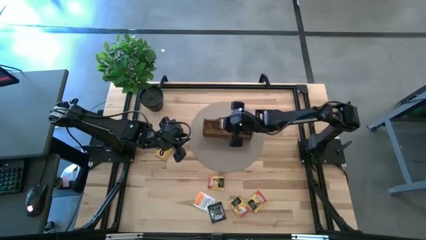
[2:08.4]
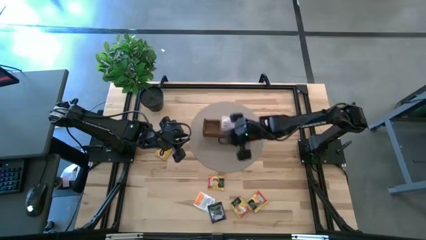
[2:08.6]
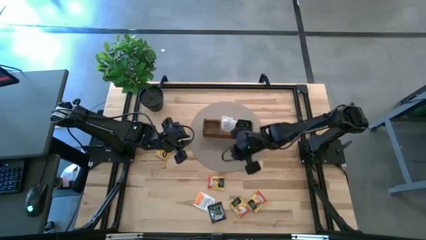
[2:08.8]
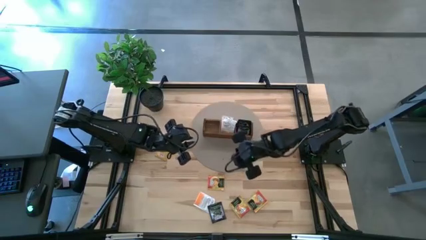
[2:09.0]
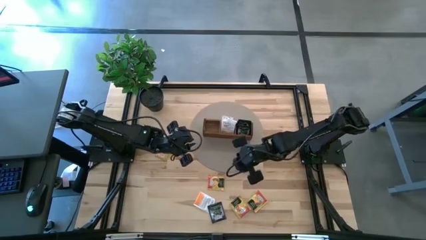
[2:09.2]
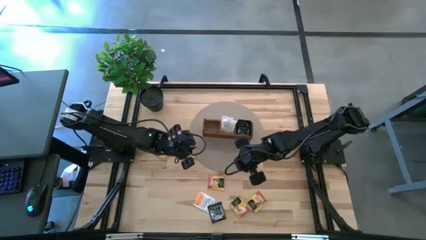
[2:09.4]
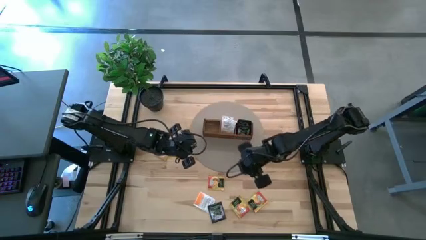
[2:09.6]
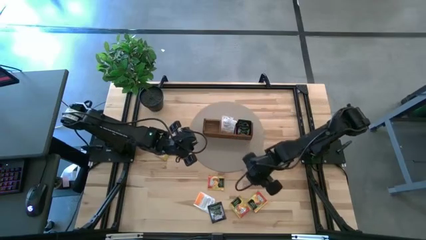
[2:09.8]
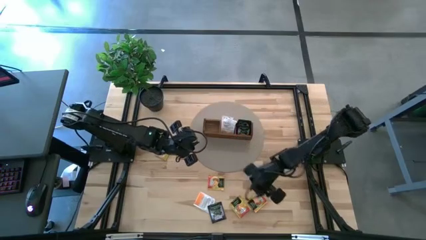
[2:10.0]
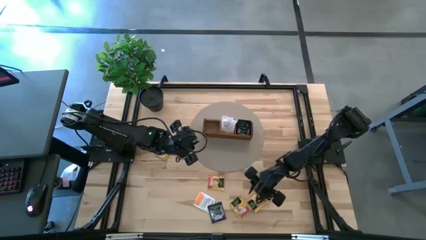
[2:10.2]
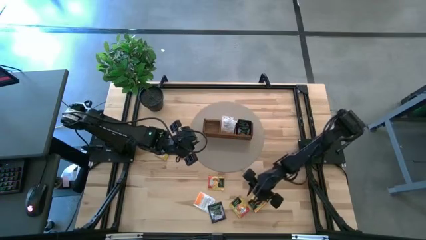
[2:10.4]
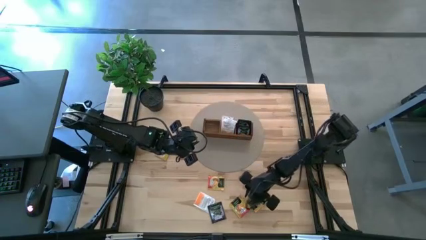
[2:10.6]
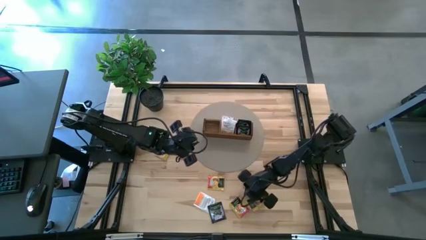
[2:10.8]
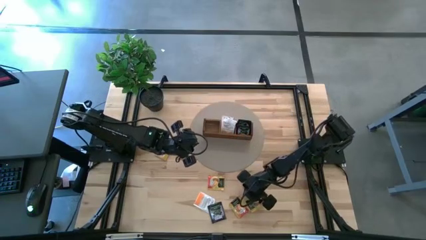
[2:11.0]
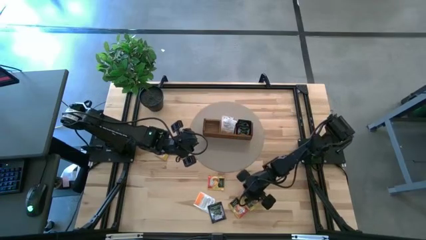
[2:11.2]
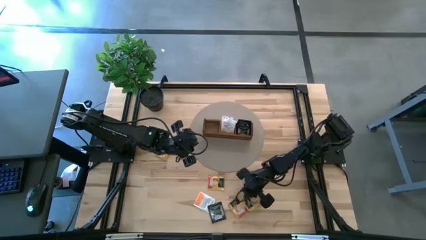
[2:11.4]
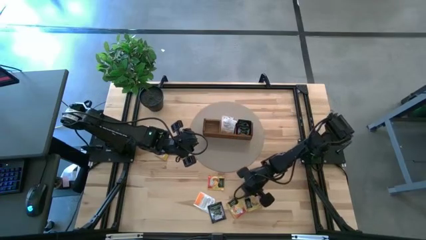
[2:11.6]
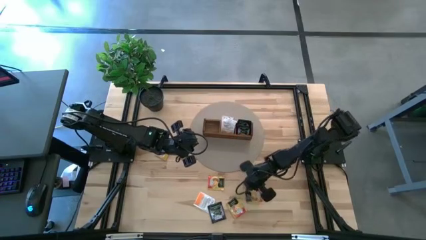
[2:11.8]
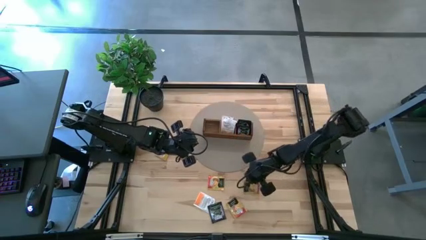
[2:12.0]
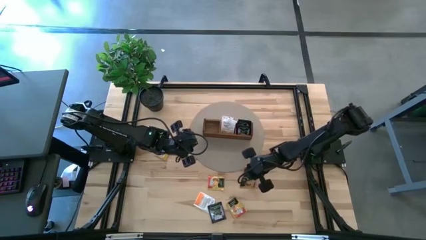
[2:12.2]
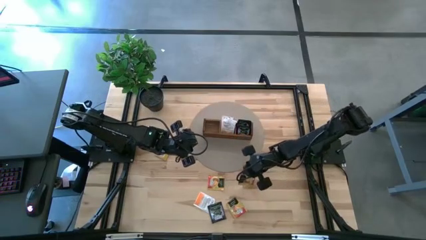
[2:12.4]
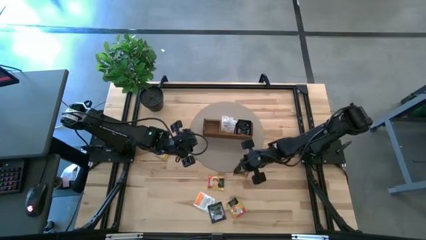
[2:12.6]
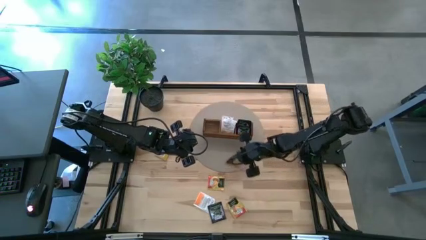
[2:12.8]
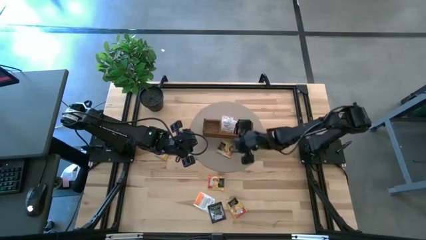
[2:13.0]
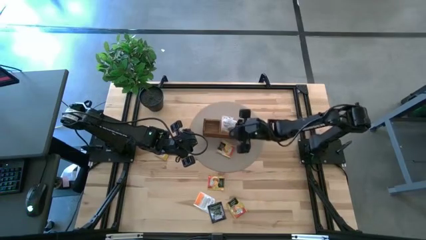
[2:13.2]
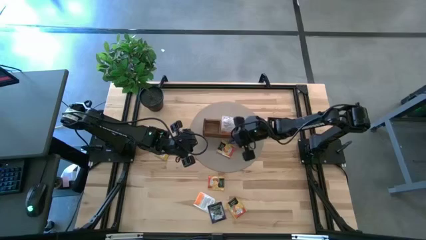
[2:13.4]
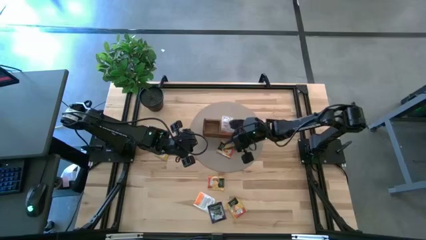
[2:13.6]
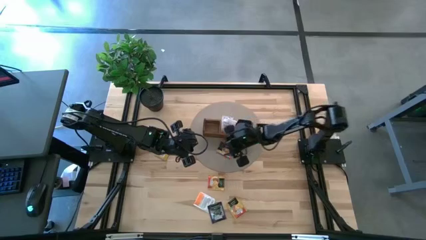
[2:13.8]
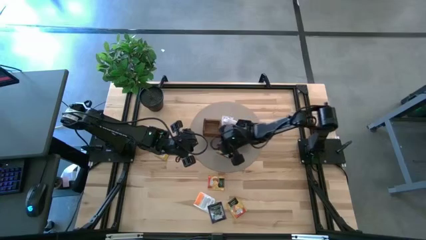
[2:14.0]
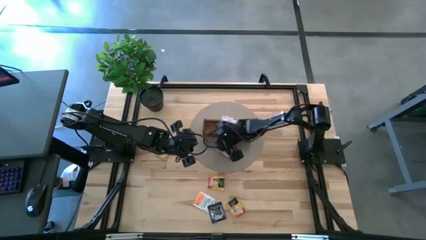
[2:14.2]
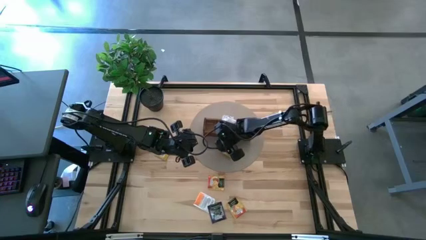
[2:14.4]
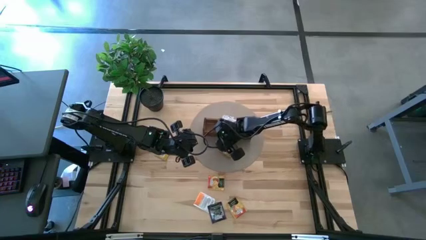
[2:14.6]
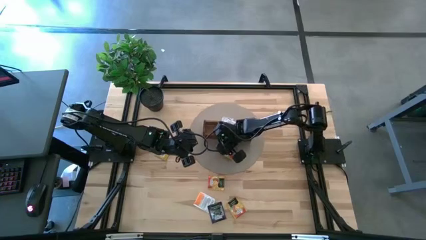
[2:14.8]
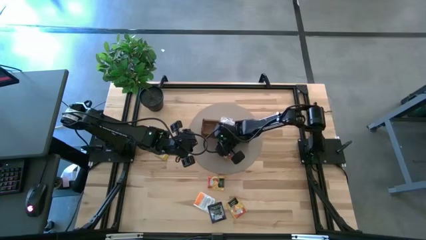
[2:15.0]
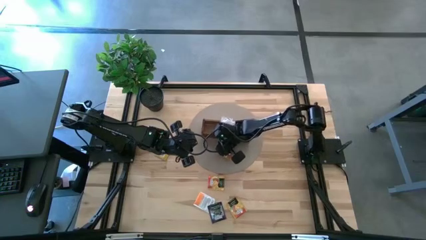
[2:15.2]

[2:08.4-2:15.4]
Task: Pick & Place Tea
Put the yellow tea bag into the left section of the wooden organizer

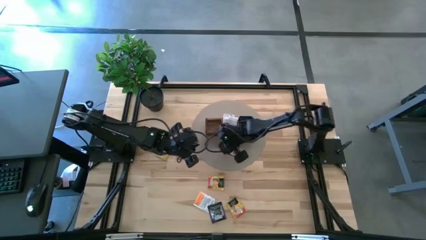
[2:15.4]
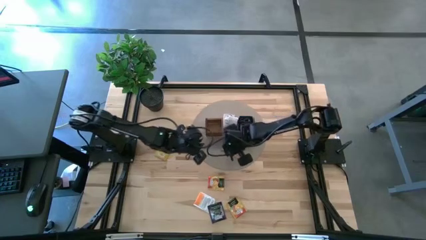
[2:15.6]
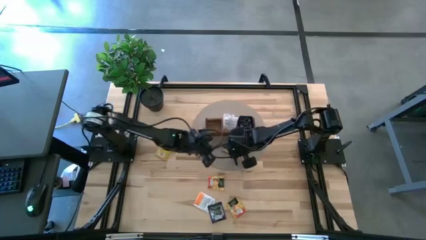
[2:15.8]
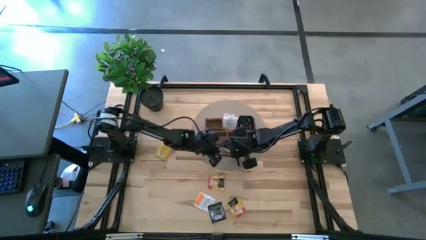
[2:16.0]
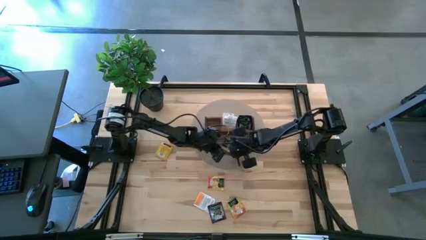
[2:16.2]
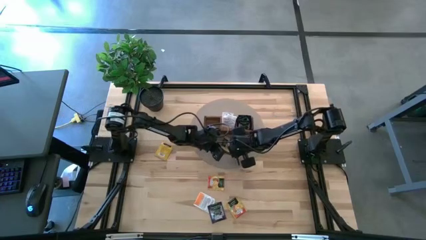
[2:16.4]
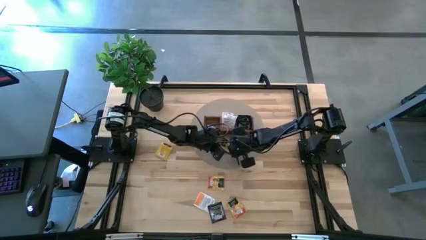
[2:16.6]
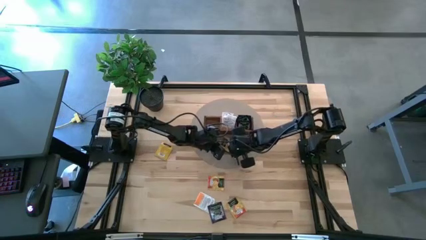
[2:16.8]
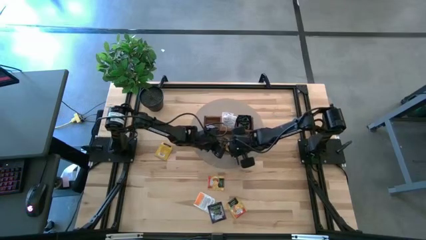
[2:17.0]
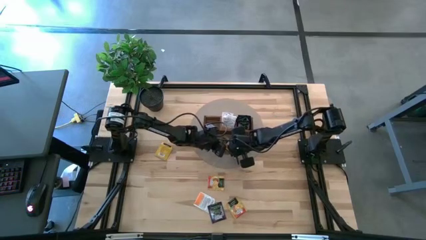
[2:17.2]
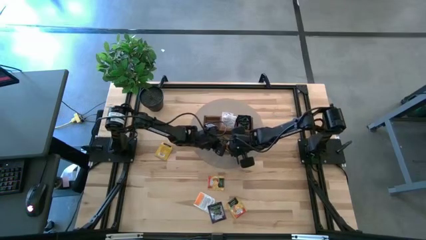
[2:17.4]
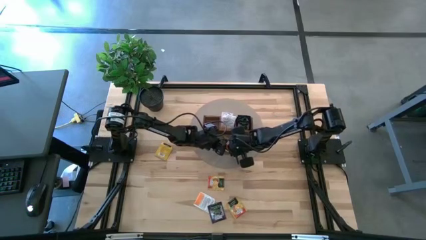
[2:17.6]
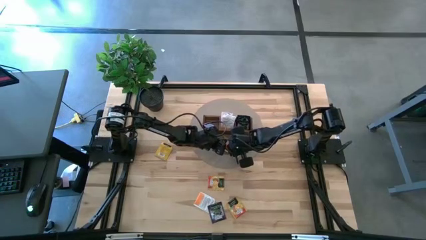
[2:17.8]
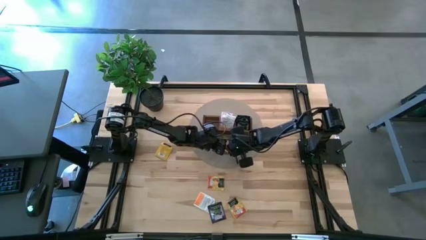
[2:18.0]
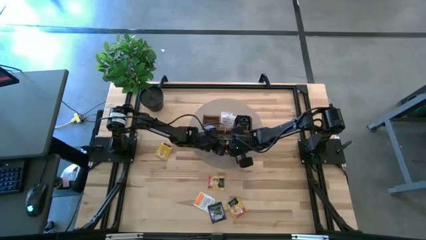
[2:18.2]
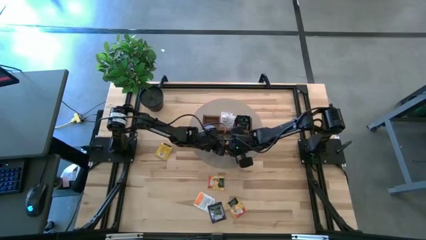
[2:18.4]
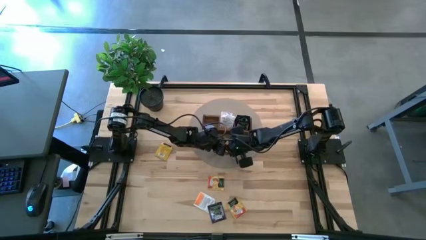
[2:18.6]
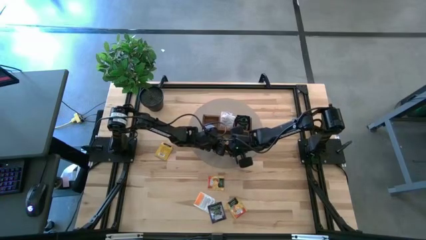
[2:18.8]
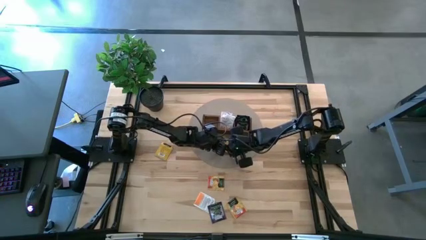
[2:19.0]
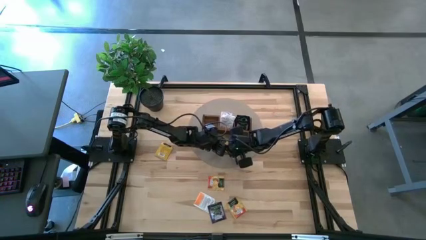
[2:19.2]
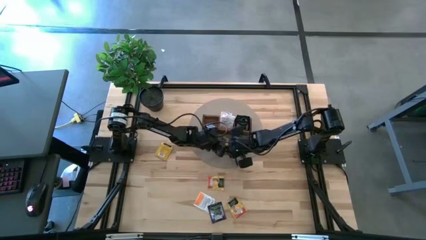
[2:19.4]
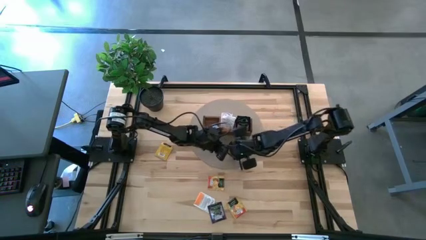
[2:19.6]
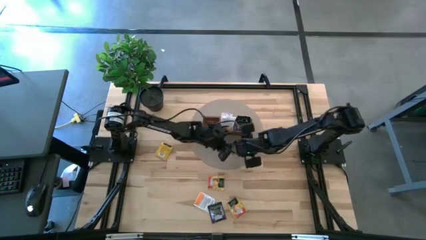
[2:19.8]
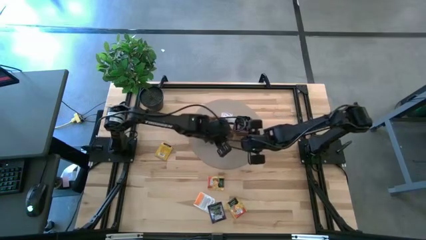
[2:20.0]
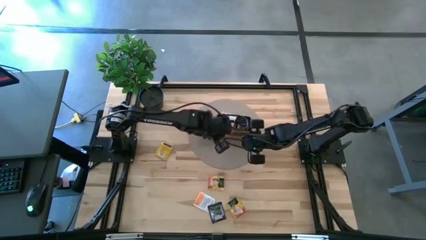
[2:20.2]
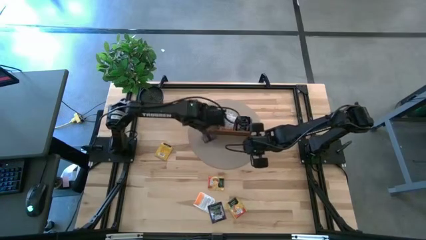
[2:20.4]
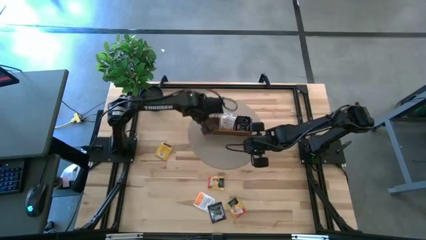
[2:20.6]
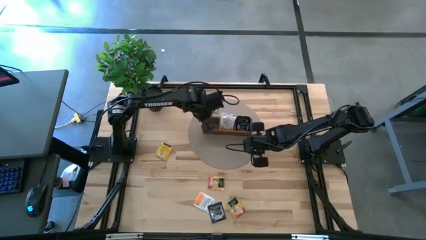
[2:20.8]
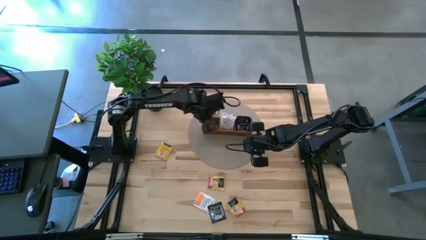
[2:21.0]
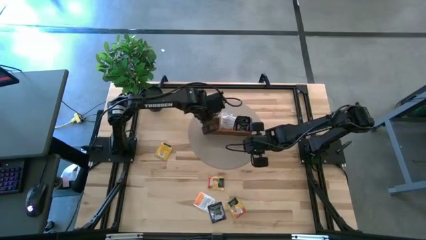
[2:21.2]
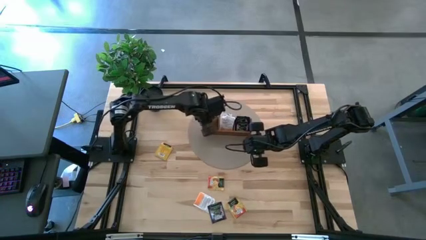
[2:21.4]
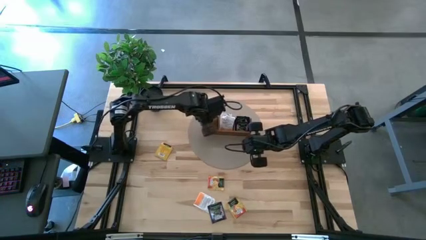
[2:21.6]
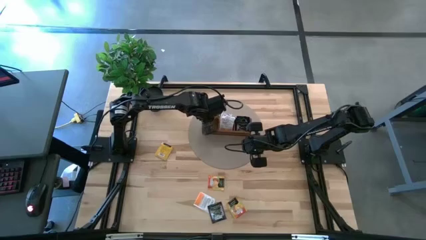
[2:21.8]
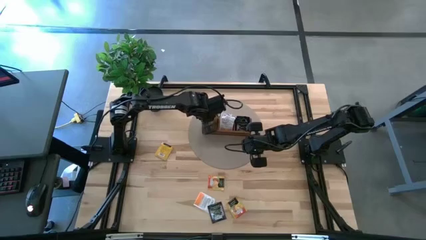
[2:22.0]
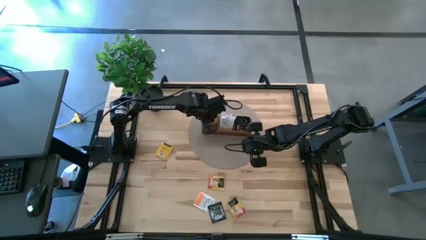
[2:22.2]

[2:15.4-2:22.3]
Put the yellow tea bag into the left section of the wooden organizer

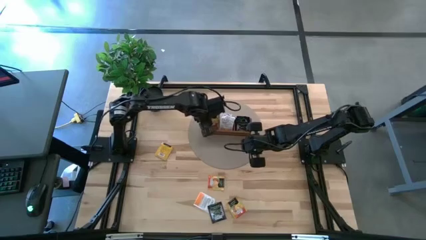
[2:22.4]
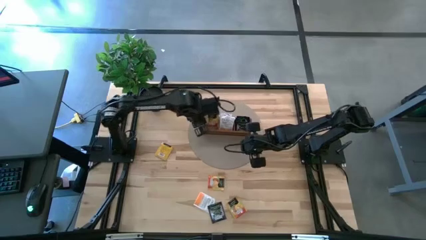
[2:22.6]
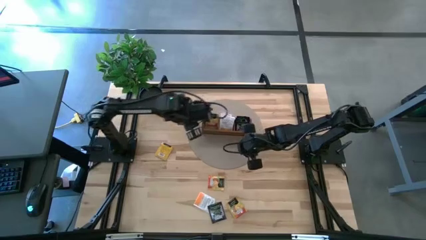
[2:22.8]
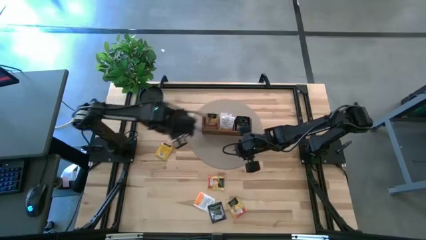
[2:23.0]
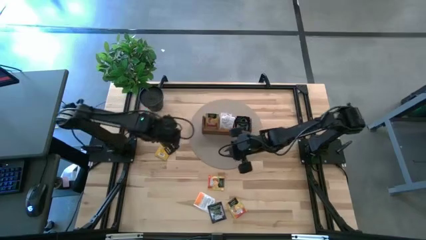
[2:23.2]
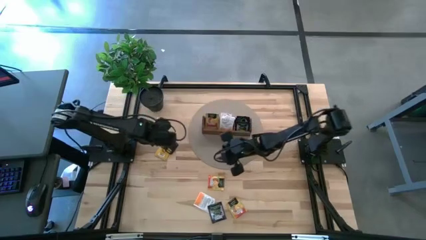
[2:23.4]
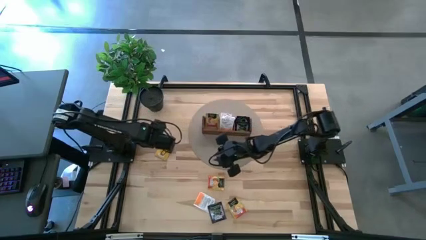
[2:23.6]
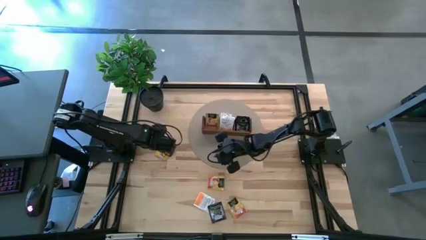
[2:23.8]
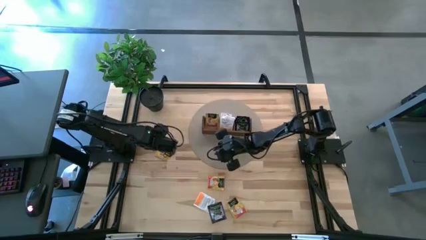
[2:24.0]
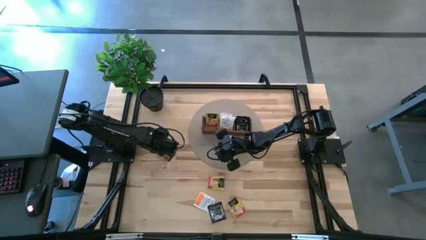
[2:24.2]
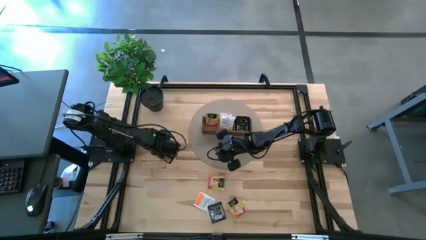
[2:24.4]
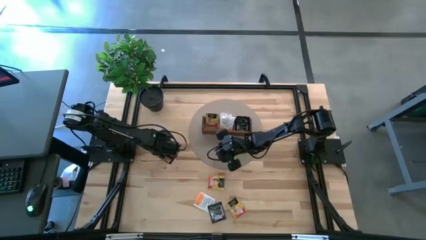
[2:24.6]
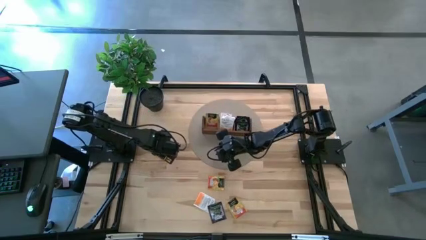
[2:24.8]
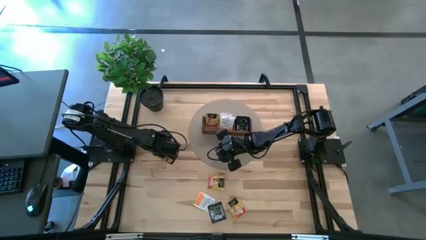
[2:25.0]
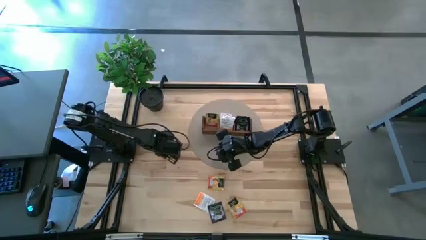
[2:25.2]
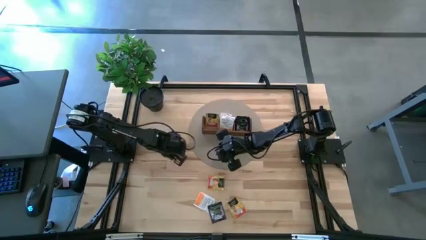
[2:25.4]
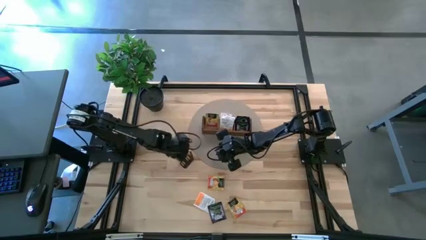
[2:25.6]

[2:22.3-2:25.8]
Put the yellow tea bag into the left section of the wooden organizer
